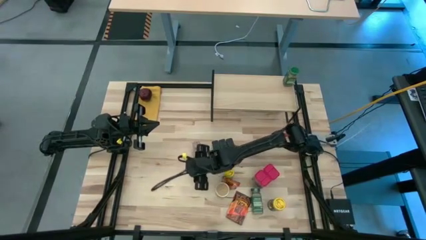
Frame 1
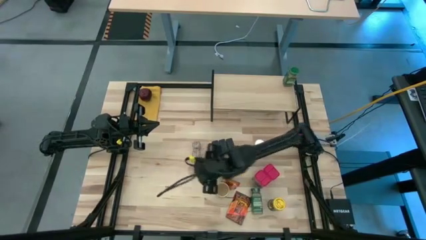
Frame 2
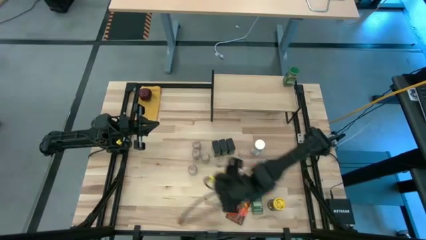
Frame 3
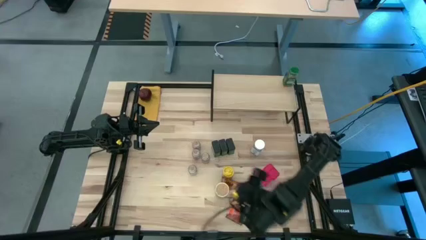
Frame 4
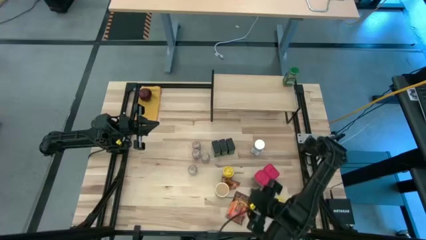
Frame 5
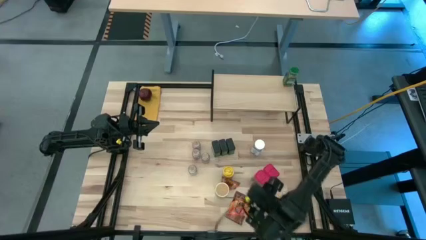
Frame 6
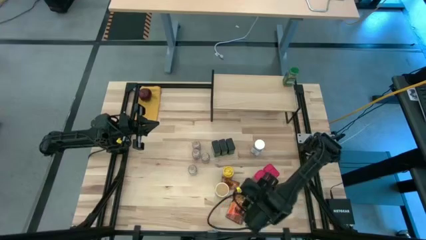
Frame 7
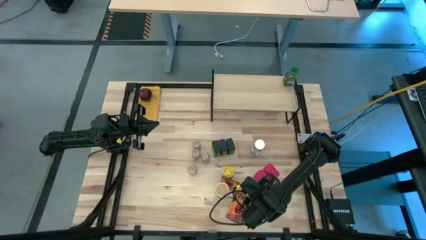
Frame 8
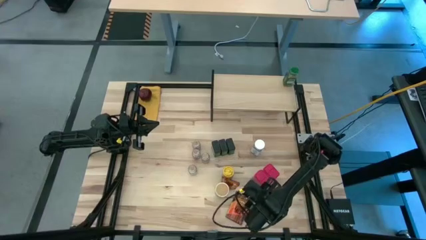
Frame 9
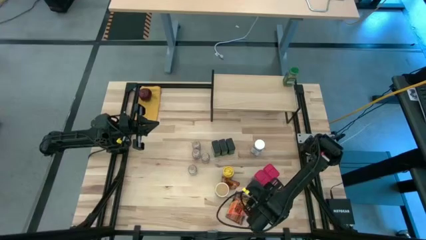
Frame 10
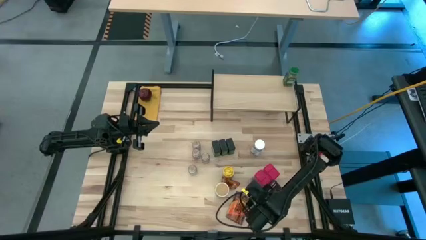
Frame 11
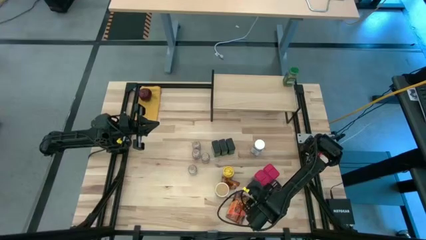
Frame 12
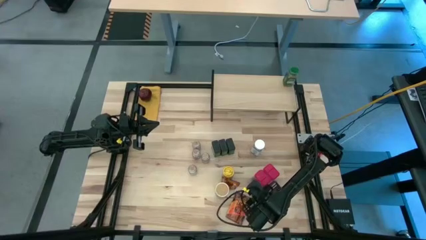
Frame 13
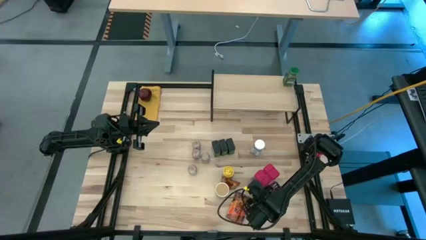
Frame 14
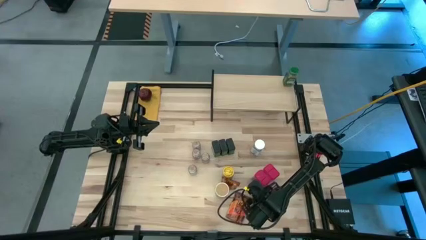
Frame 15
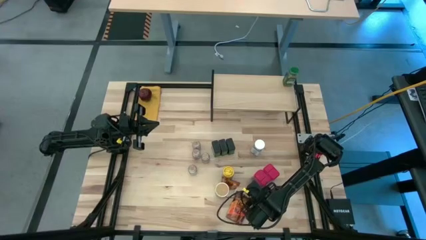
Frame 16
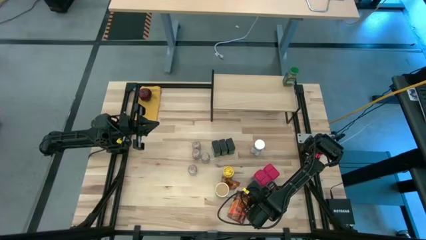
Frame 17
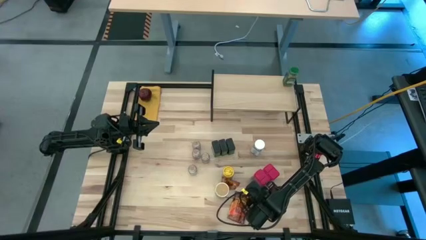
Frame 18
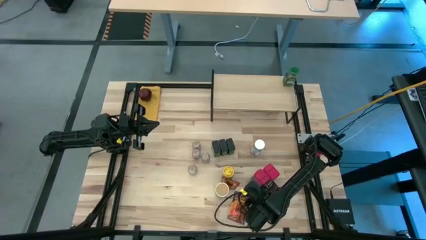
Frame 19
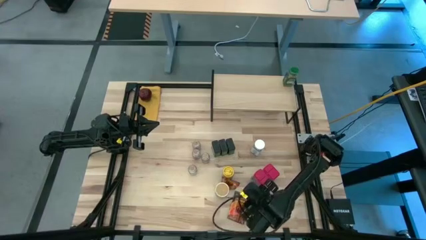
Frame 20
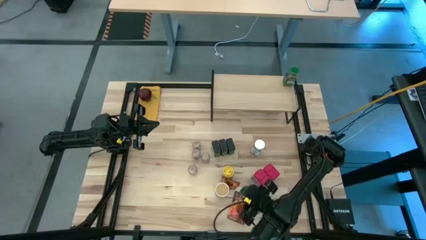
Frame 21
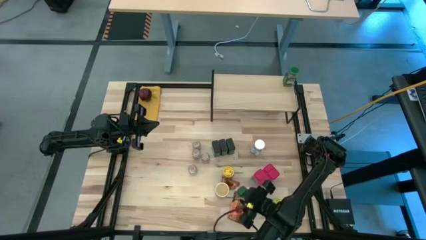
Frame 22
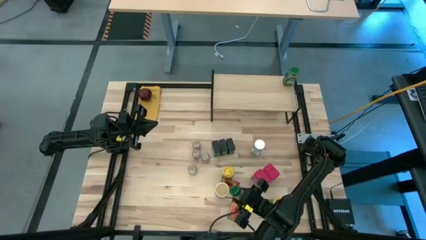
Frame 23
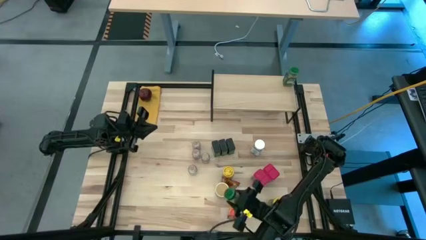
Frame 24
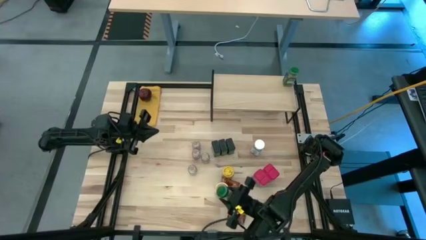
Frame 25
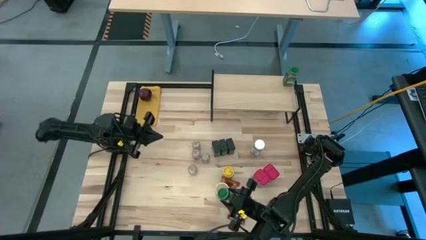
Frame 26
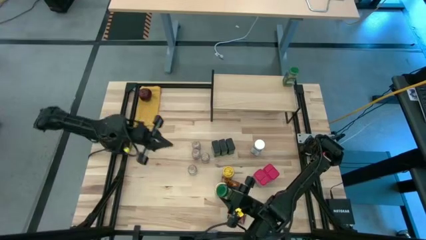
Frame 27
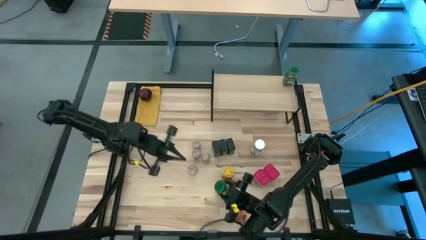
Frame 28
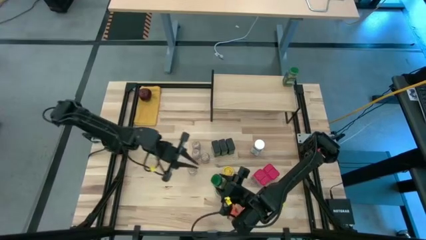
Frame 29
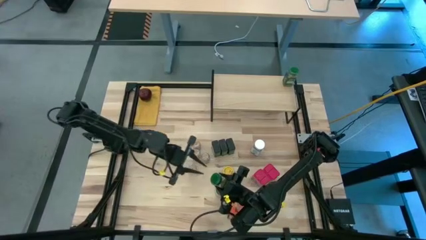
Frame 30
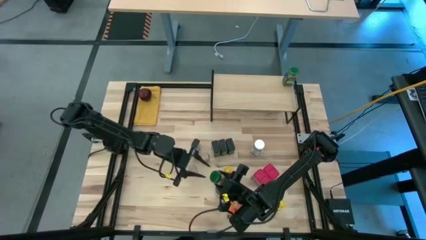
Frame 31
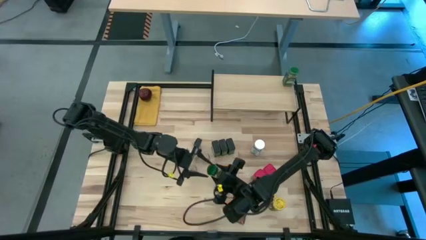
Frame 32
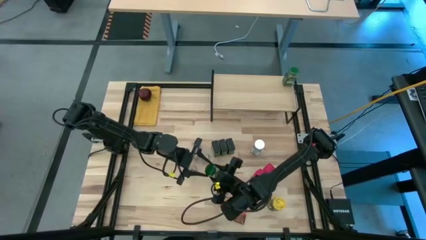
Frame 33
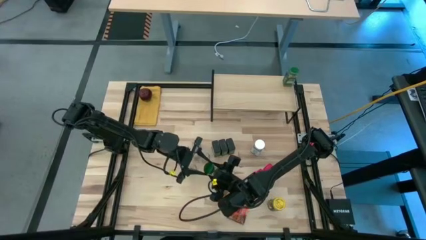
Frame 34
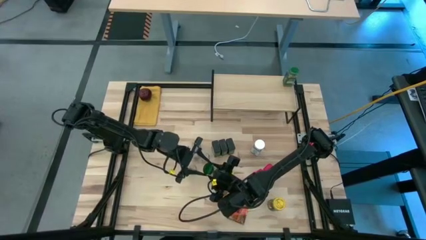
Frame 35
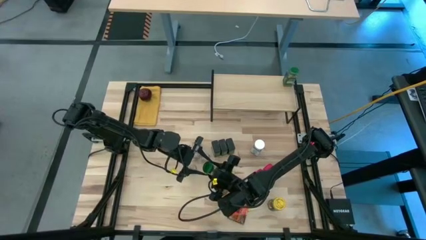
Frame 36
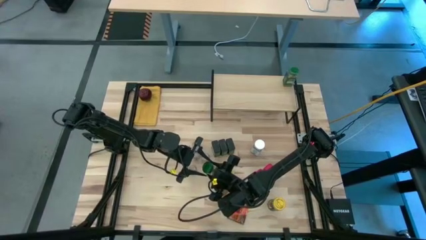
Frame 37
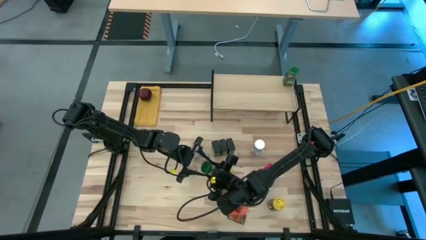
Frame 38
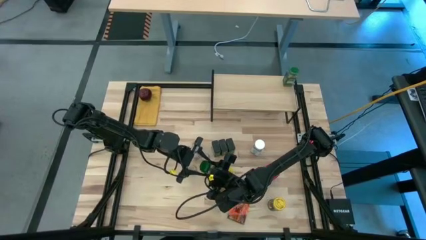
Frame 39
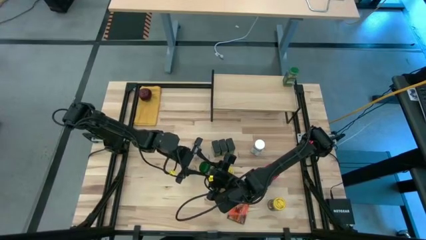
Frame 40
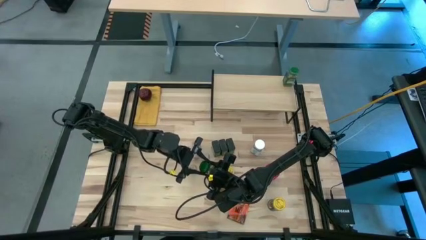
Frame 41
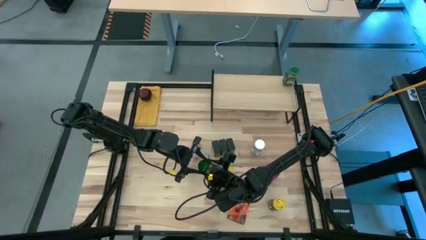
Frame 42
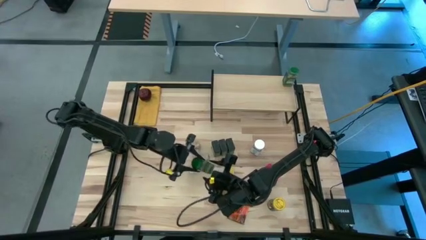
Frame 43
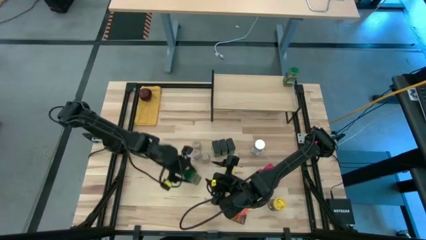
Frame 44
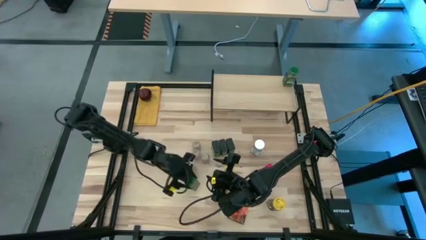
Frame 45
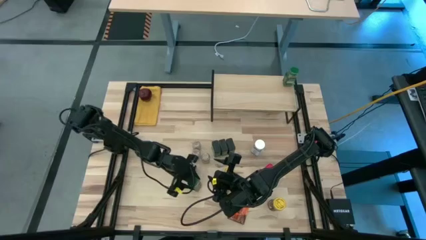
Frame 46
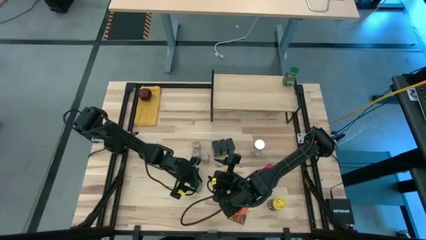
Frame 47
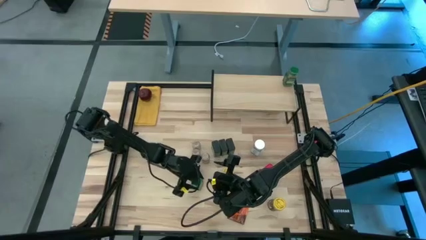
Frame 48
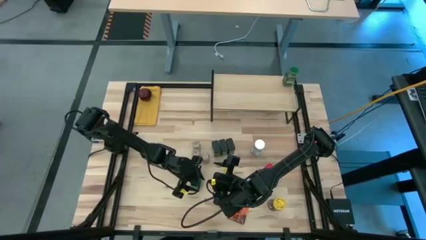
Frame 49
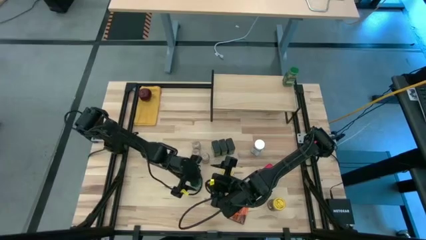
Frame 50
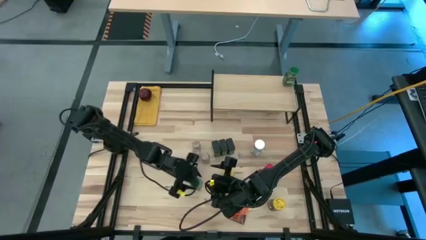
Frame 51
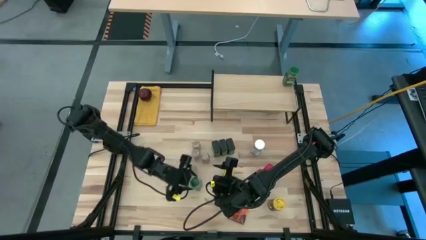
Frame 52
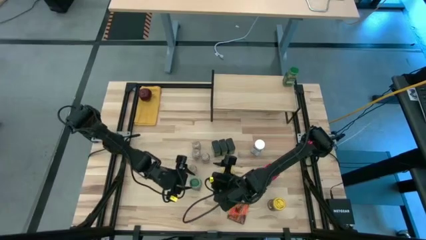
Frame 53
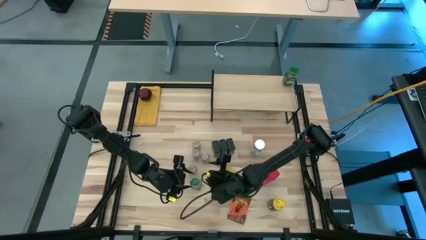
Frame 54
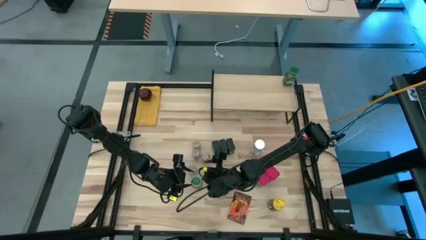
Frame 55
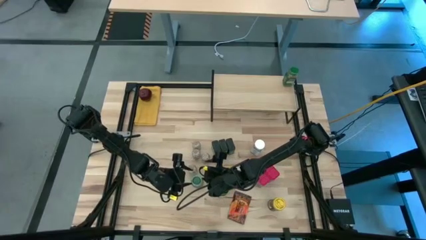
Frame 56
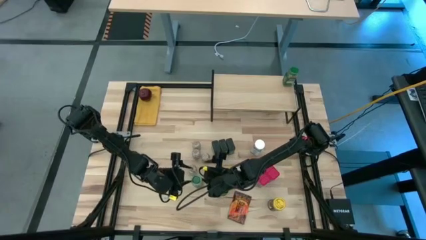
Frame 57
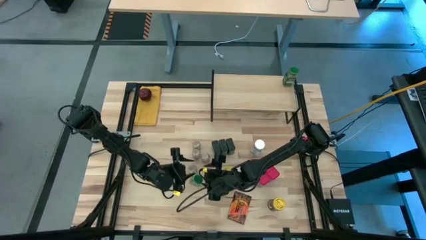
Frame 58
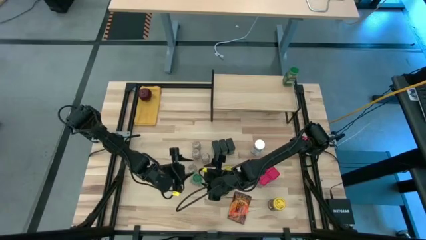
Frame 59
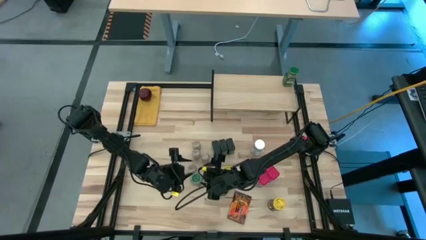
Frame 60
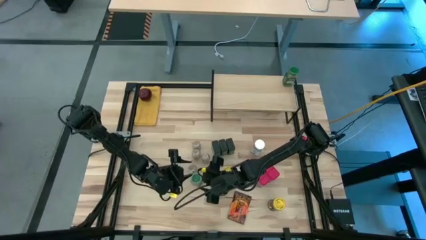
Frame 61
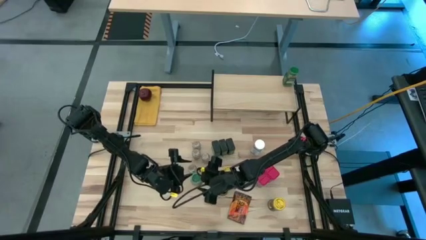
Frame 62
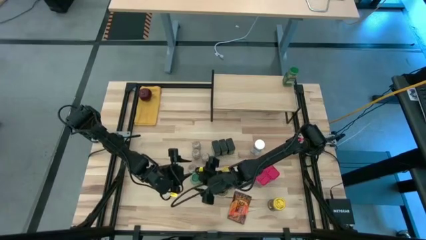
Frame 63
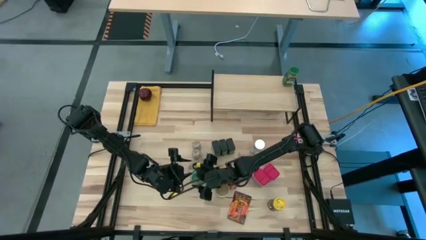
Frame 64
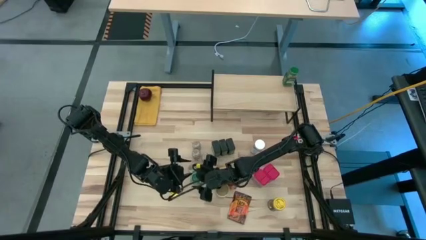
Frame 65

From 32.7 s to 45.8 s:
Task: Shelf spices
Put the green seasoning bottle on the shelf and align it with the other green seasoning bottle
